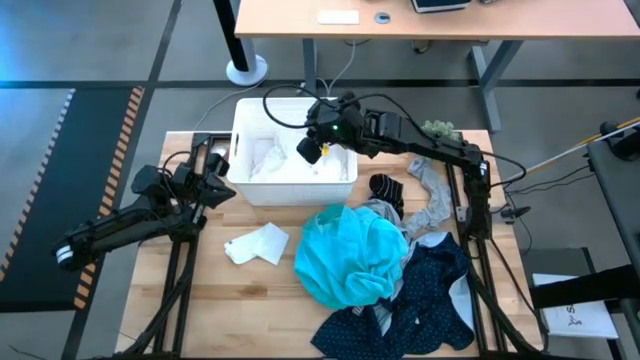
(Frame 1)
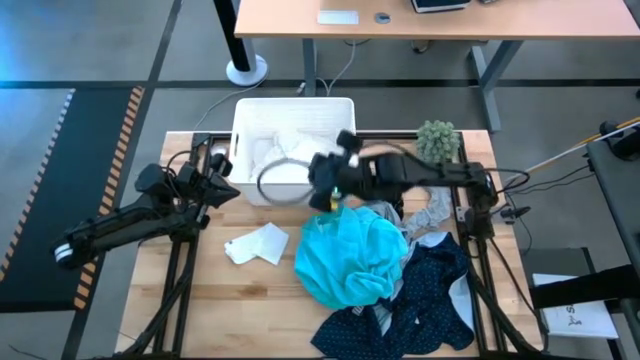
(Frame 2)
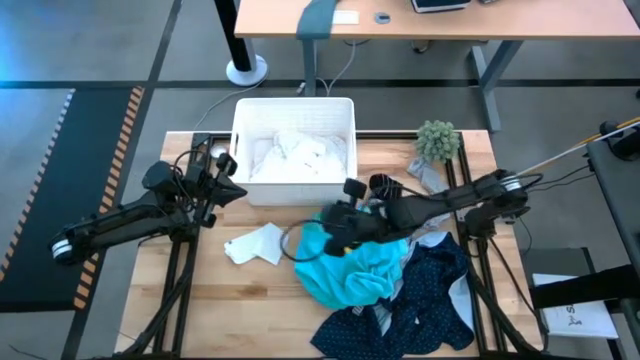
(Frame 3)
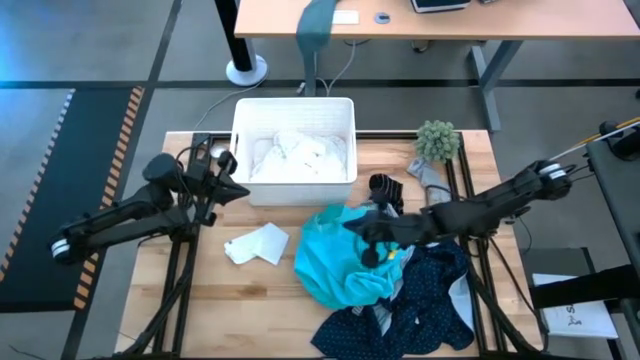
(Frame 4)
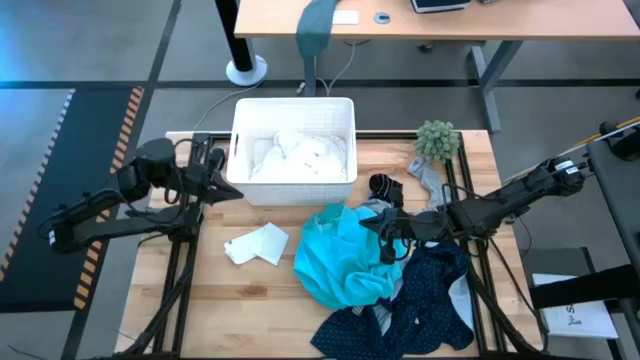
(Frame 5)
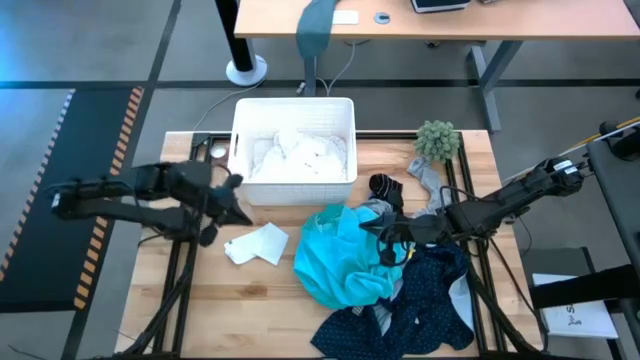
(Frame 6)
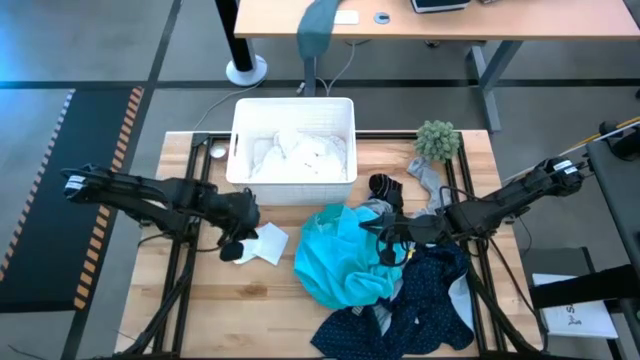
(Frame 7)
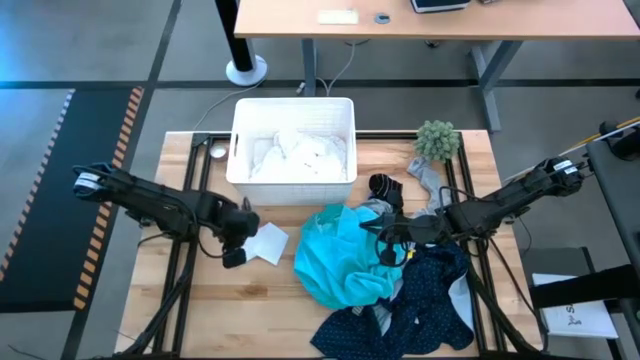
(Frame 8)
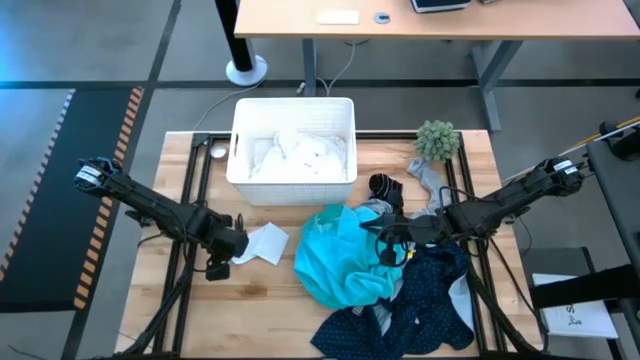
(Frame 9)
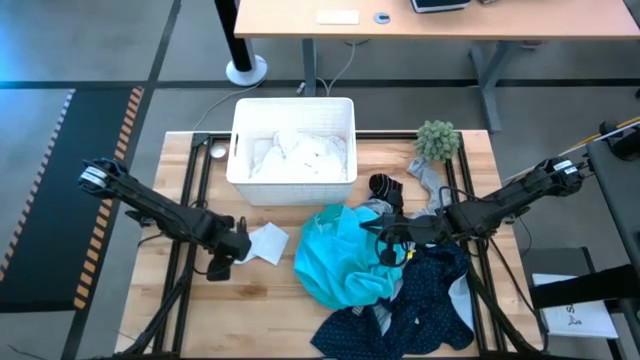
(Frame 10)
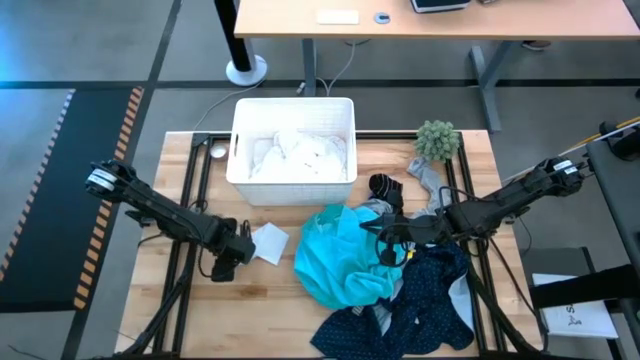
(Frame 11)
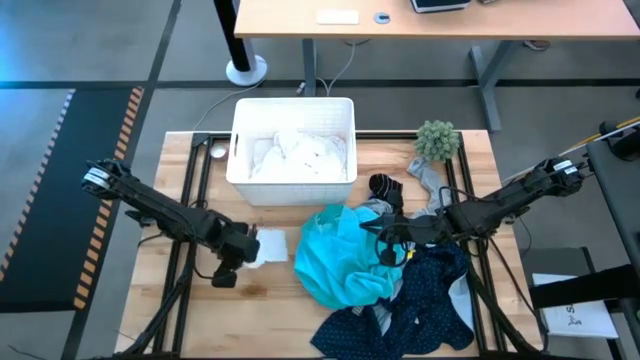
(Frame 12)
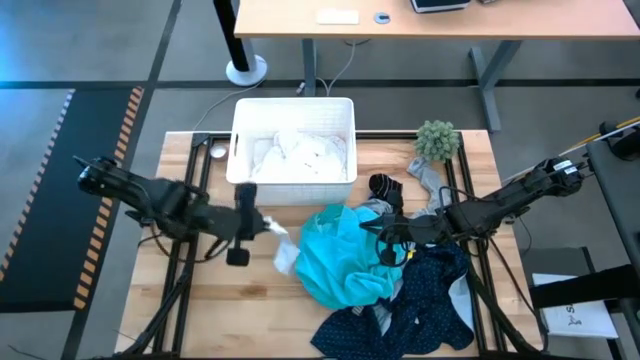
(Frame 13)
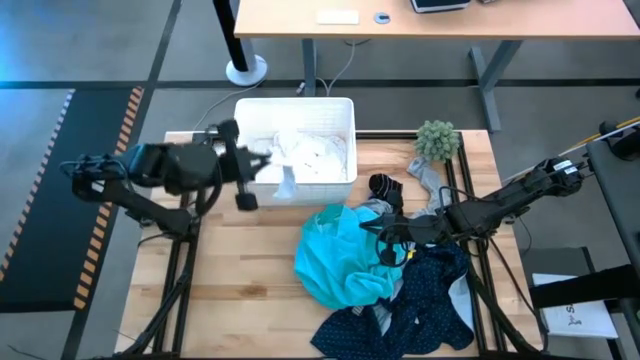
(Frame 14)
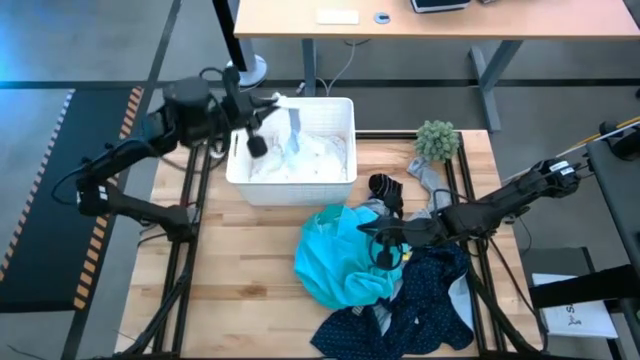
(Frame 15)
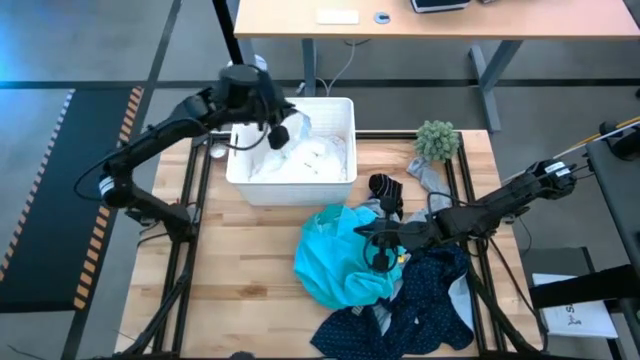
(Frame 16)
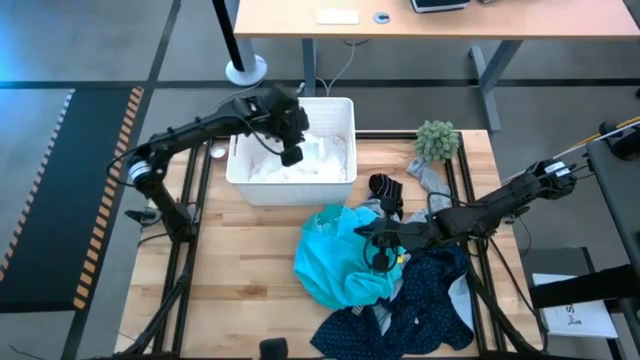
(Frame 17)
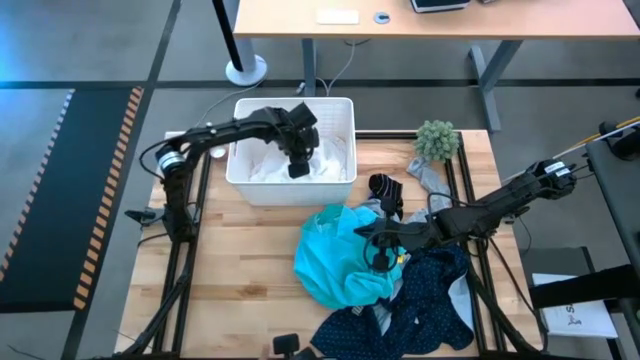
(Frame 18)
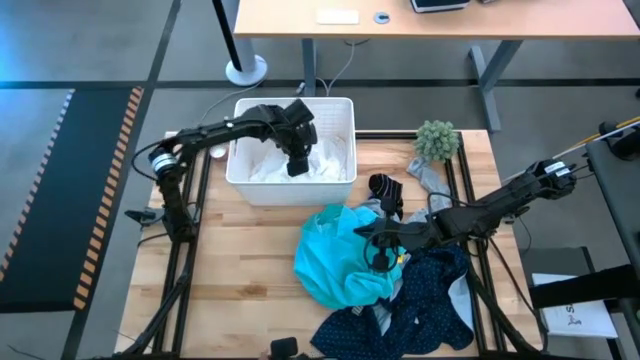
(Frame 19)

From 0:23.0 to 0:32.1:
Task: Sort clothes
Put the white sock into the bin

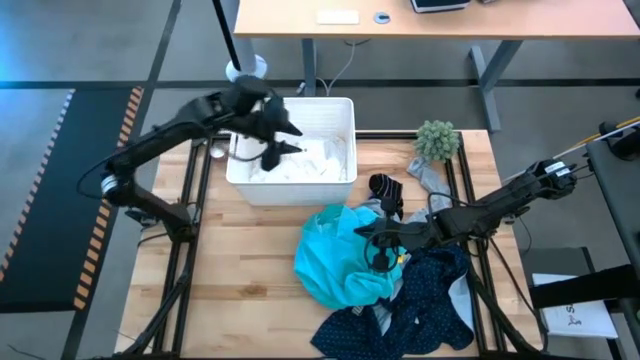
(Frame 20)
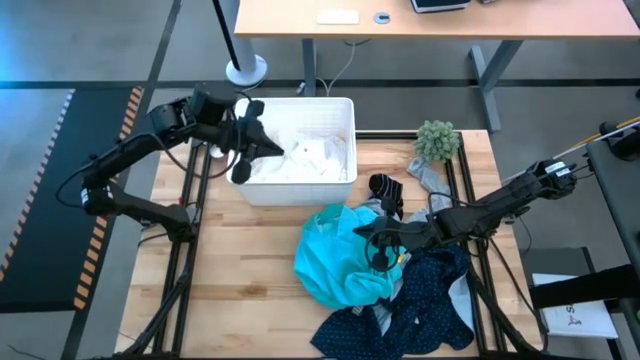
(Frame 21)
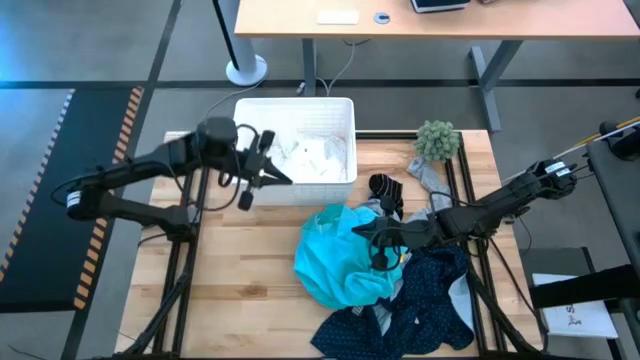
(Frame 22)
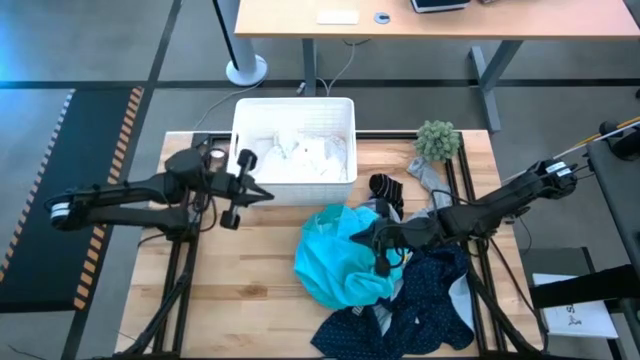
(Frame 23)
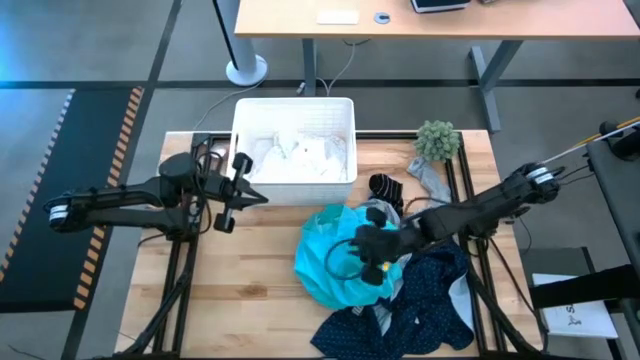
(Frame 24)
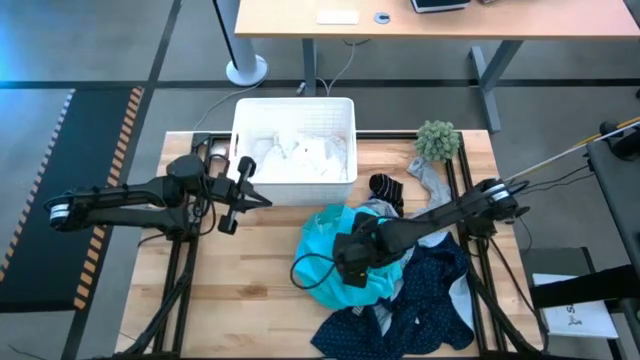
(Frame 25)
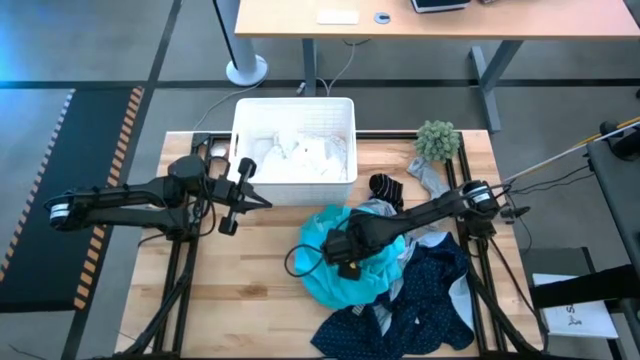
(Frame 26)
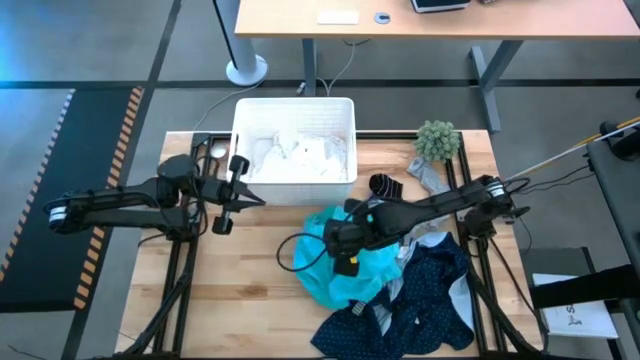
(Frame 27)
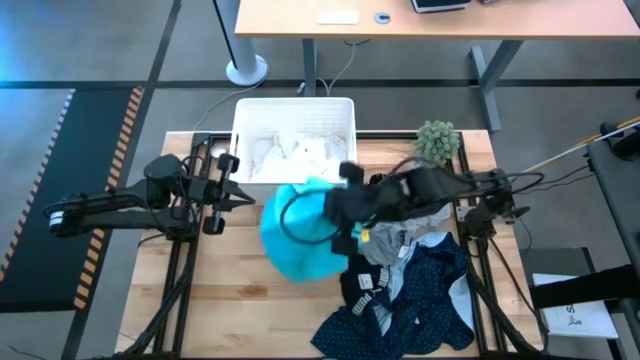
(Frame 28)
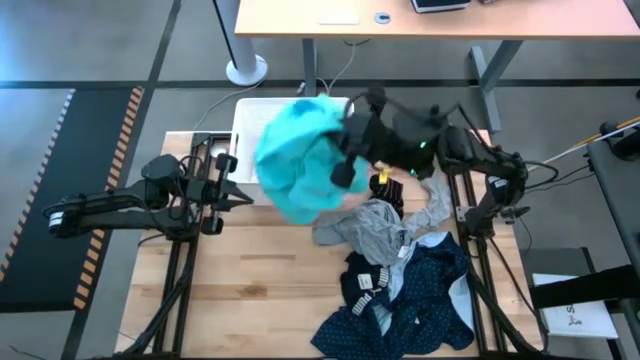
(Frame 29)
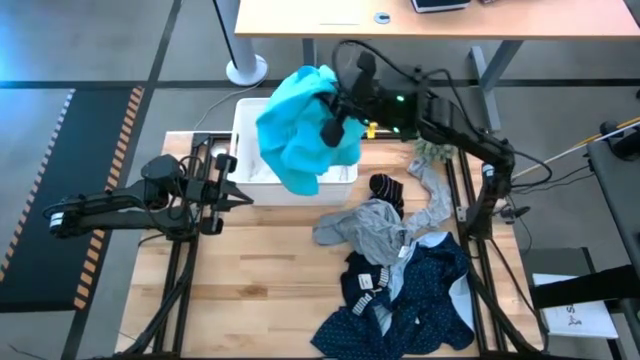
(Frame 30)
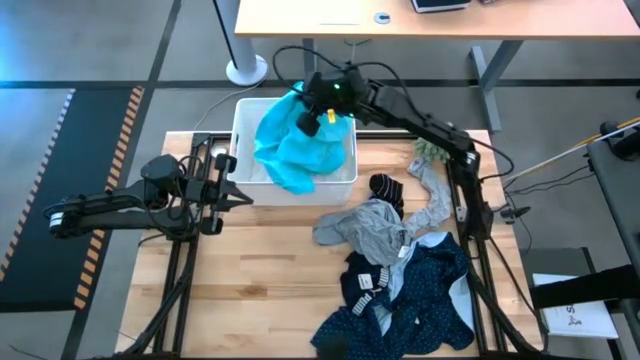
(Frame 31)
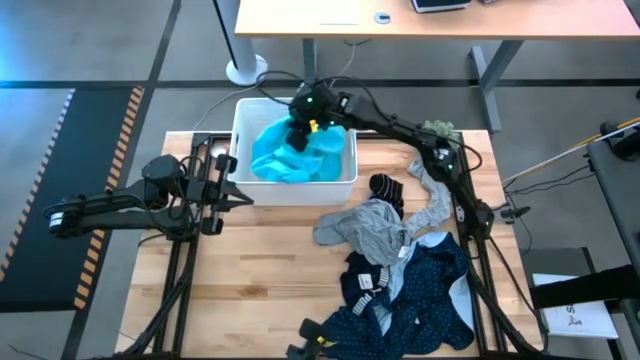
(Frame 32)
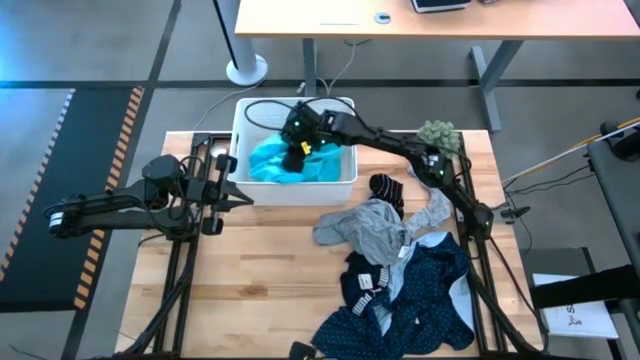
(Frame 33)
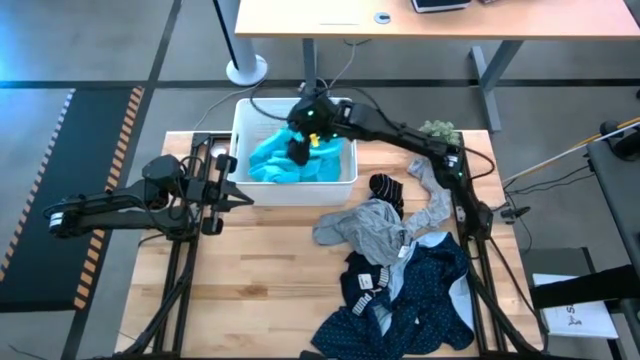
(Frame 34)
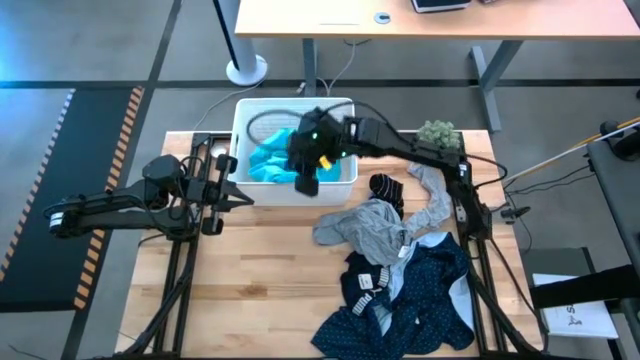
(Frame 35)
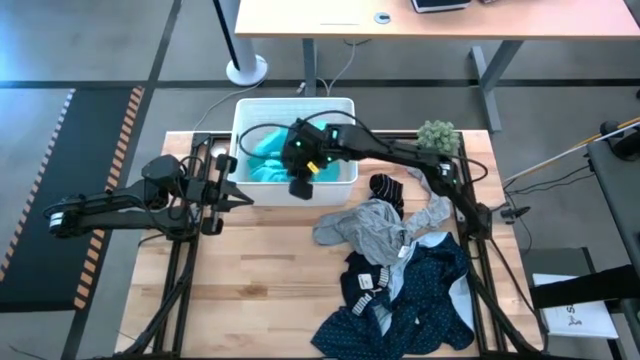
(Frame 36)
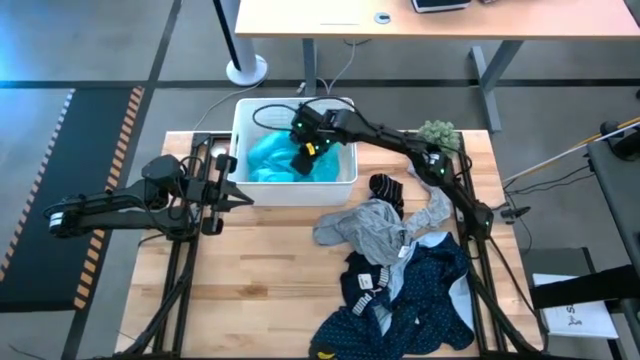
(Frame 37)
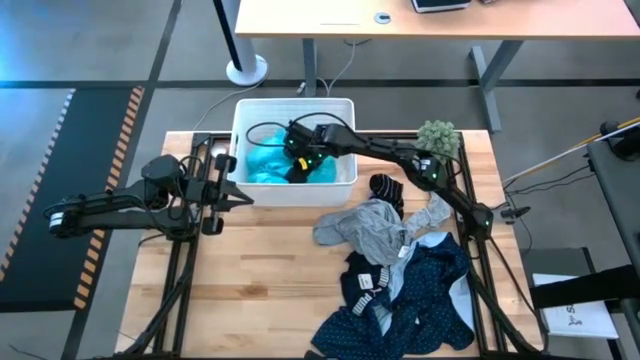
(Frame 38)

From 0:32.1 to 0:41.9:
Put the shorts into the bin

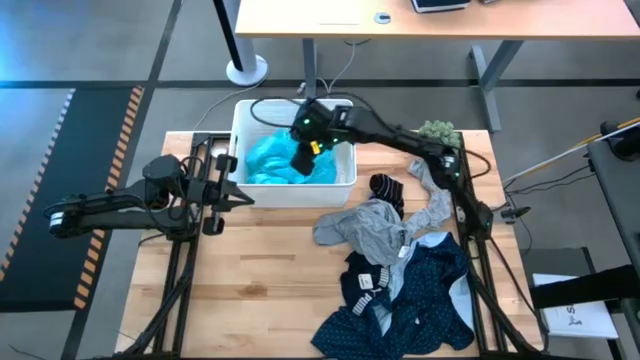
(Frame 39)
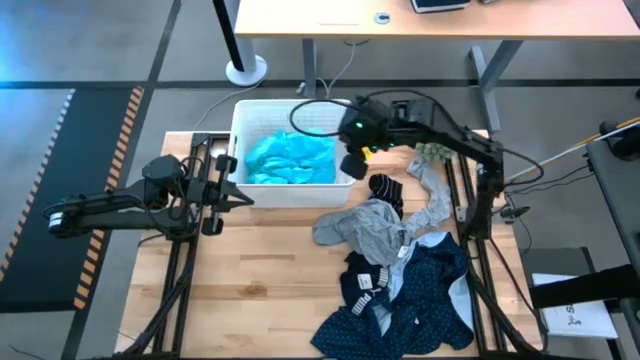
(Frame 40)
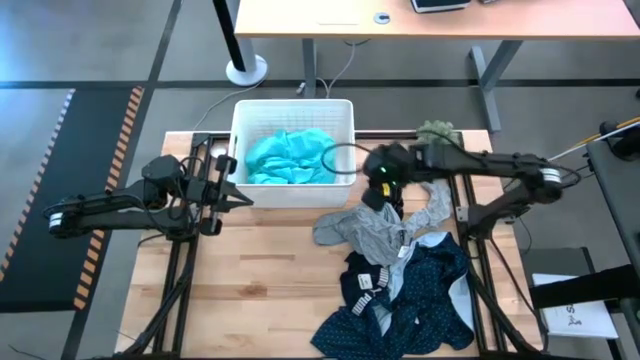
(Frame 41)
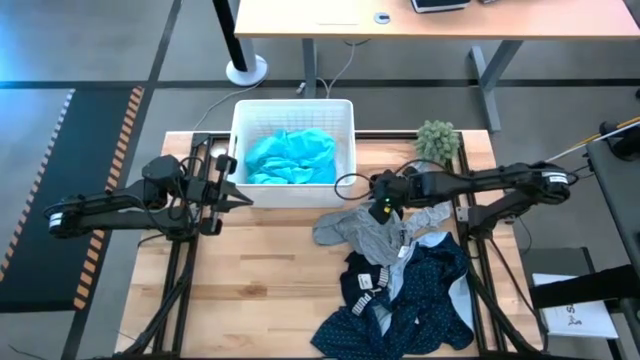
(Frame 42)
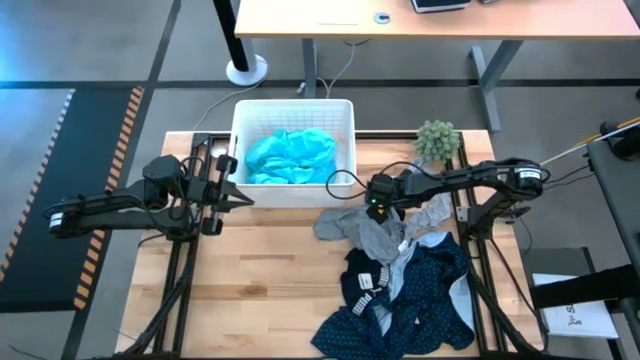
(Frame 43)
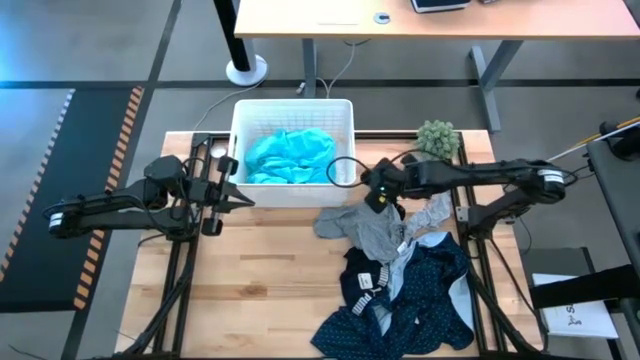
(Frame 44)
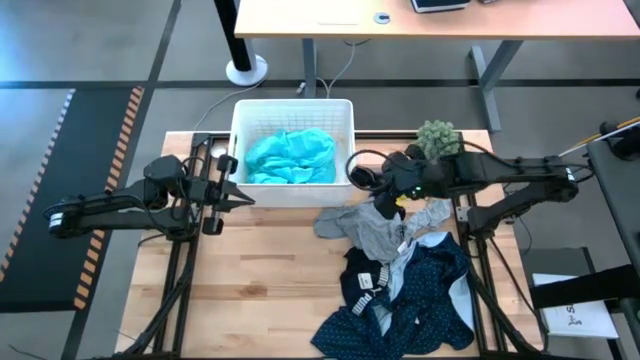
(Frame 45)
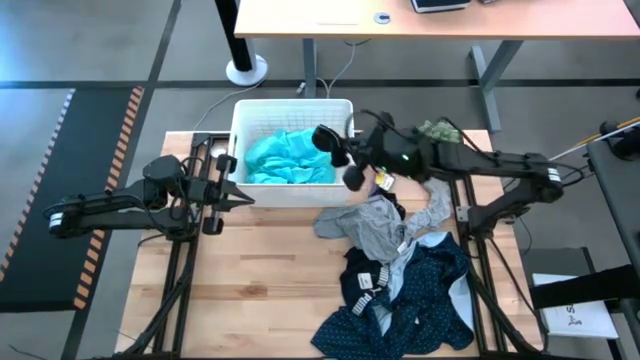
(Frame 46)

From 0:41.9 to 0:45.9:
Put the top black sock into the bin
